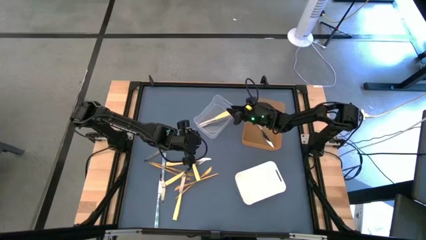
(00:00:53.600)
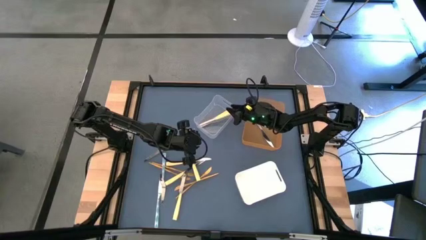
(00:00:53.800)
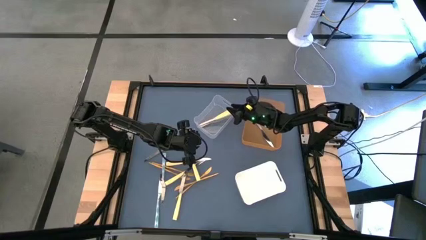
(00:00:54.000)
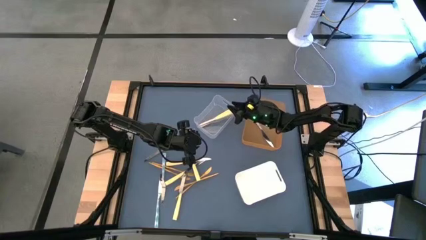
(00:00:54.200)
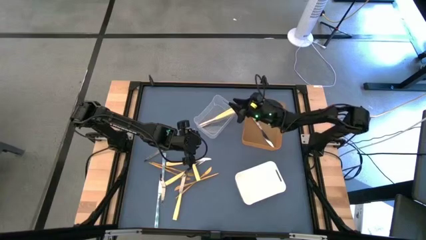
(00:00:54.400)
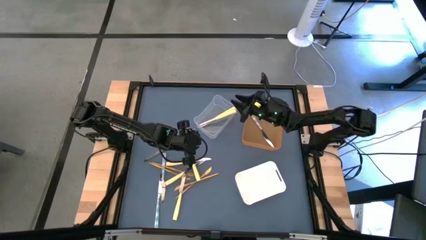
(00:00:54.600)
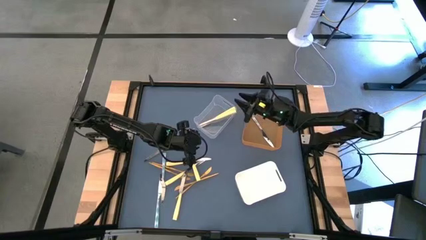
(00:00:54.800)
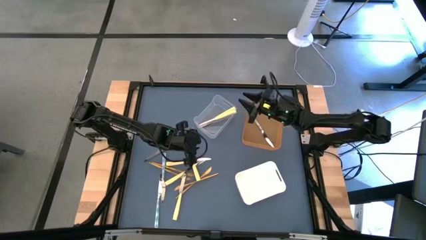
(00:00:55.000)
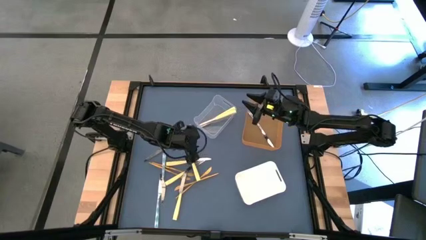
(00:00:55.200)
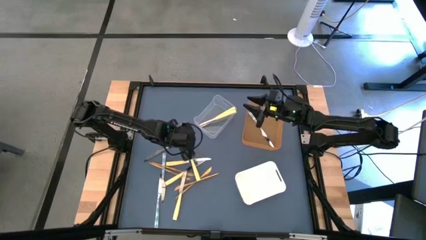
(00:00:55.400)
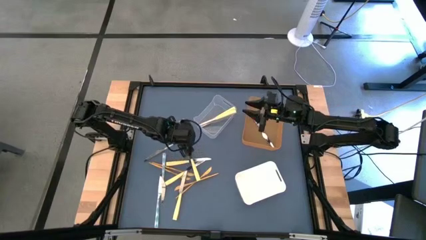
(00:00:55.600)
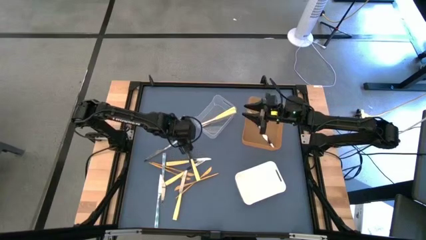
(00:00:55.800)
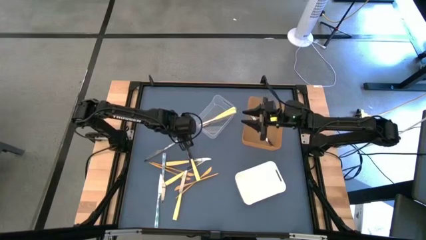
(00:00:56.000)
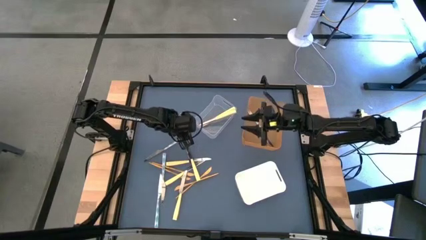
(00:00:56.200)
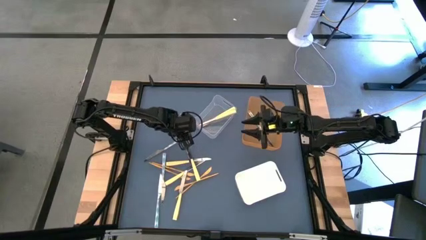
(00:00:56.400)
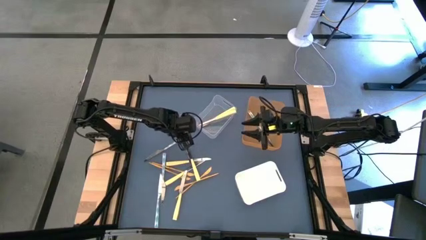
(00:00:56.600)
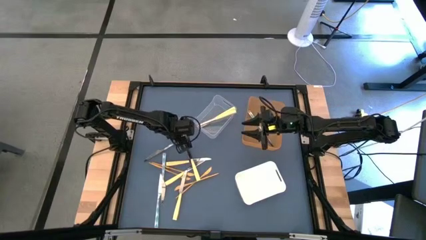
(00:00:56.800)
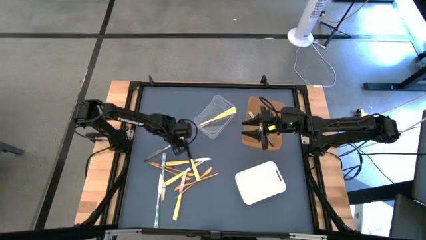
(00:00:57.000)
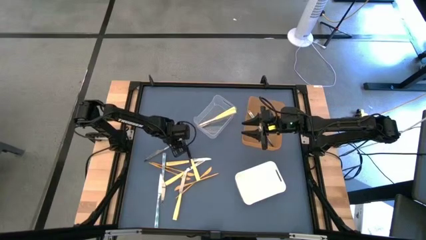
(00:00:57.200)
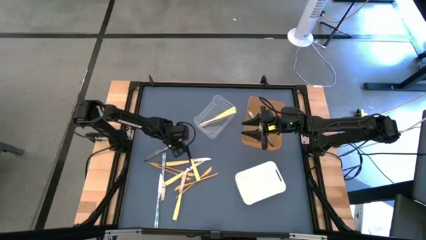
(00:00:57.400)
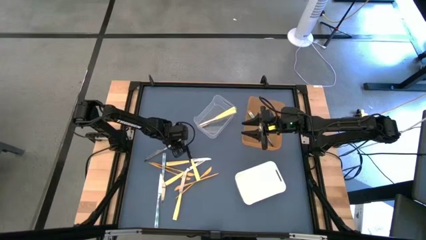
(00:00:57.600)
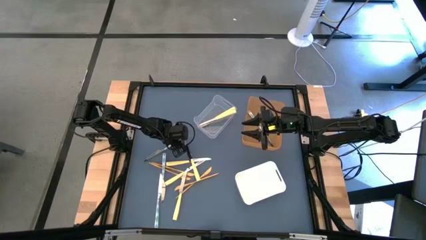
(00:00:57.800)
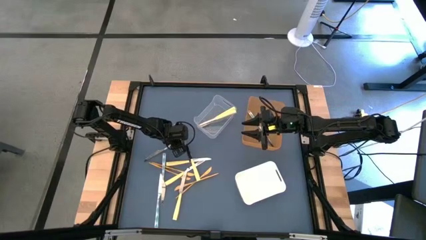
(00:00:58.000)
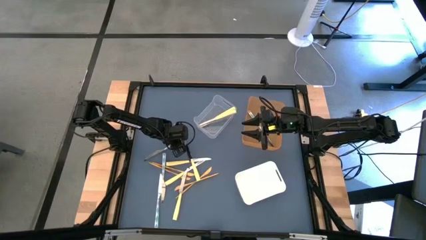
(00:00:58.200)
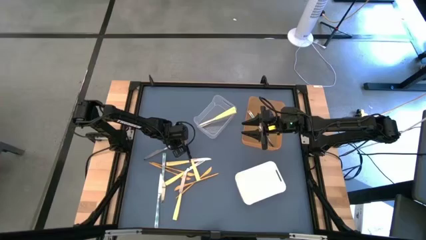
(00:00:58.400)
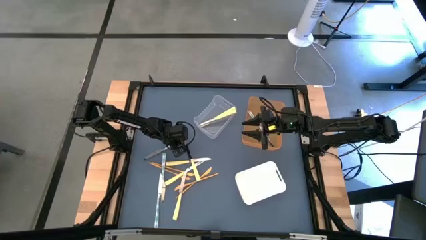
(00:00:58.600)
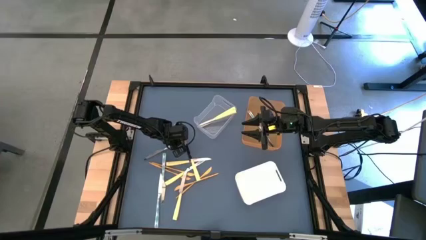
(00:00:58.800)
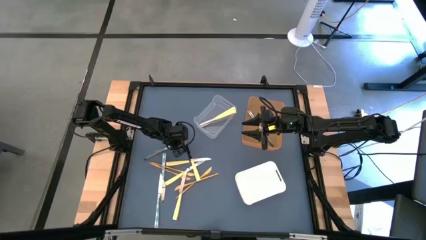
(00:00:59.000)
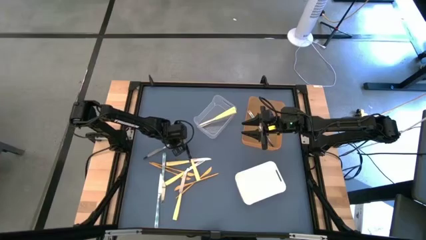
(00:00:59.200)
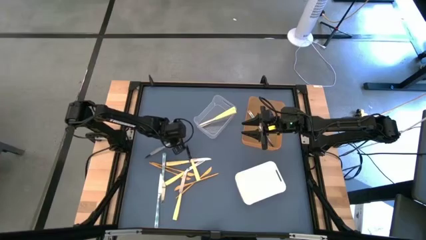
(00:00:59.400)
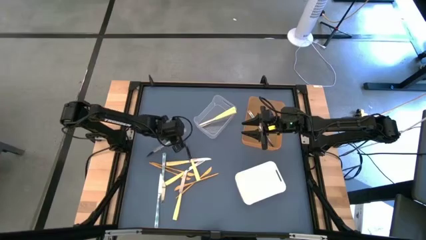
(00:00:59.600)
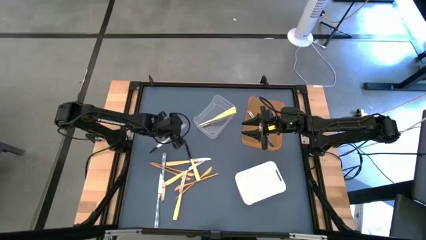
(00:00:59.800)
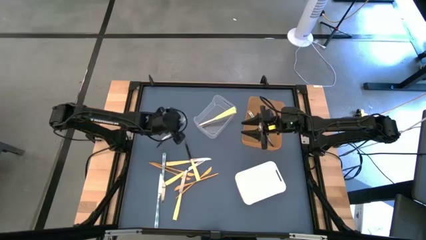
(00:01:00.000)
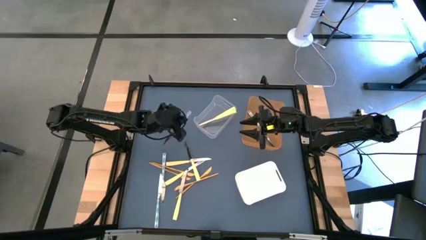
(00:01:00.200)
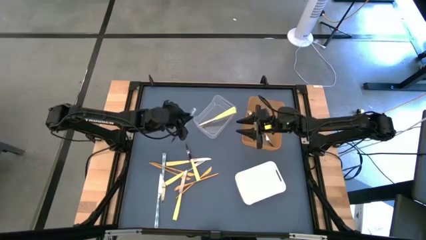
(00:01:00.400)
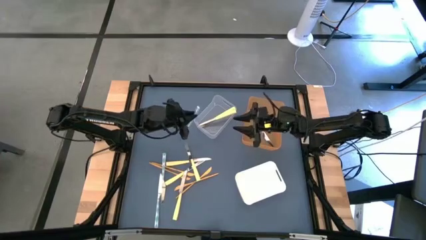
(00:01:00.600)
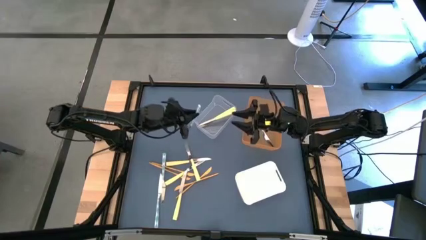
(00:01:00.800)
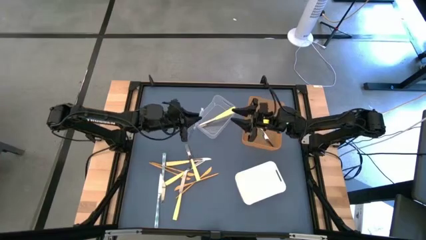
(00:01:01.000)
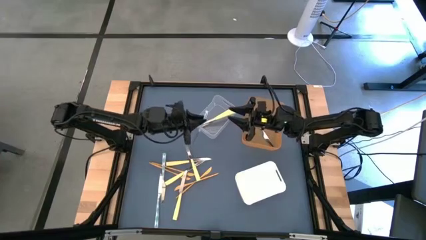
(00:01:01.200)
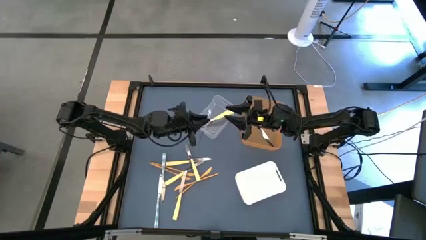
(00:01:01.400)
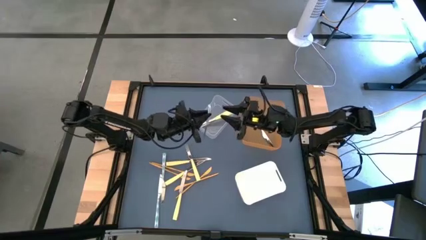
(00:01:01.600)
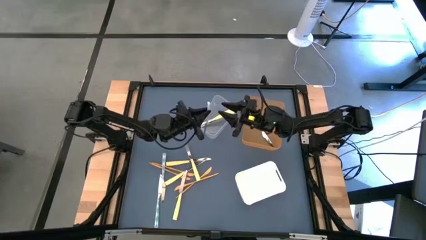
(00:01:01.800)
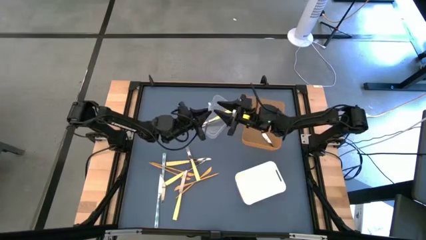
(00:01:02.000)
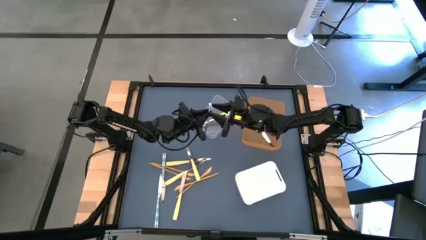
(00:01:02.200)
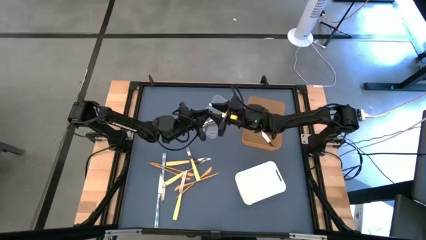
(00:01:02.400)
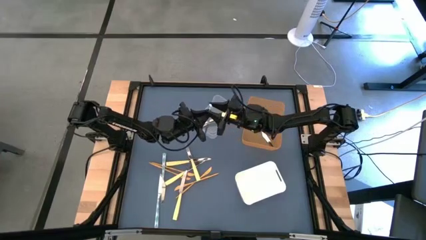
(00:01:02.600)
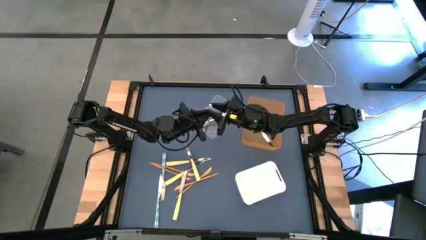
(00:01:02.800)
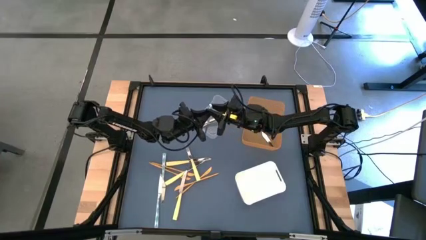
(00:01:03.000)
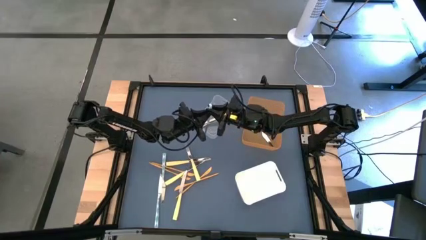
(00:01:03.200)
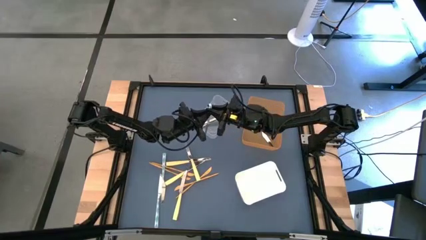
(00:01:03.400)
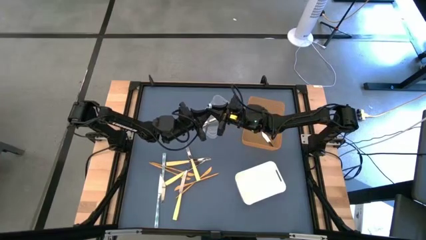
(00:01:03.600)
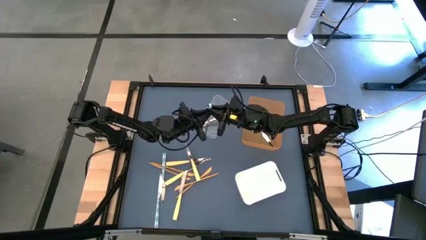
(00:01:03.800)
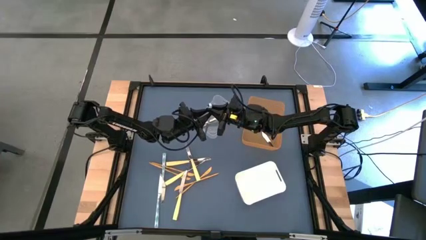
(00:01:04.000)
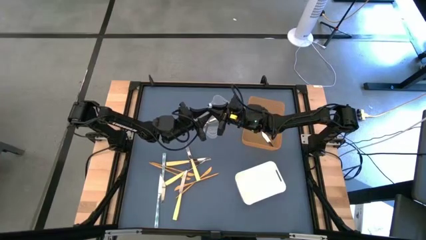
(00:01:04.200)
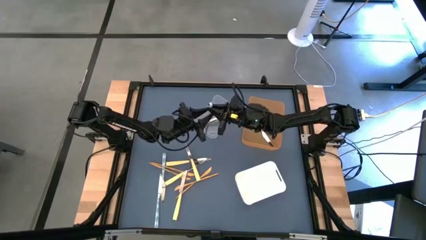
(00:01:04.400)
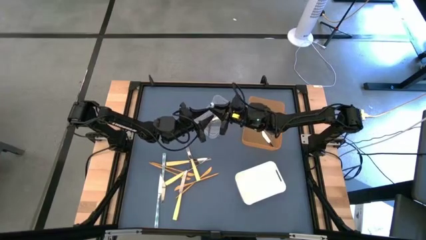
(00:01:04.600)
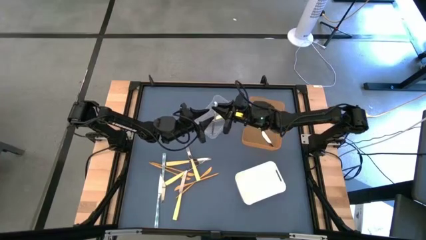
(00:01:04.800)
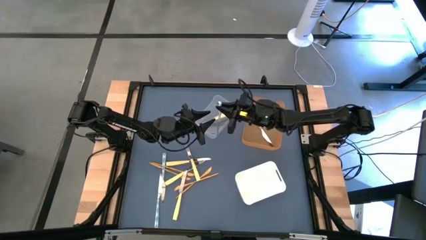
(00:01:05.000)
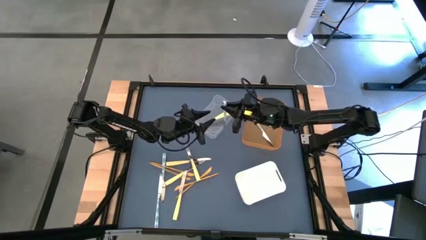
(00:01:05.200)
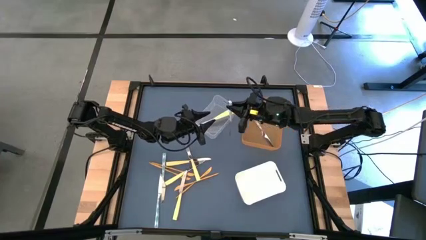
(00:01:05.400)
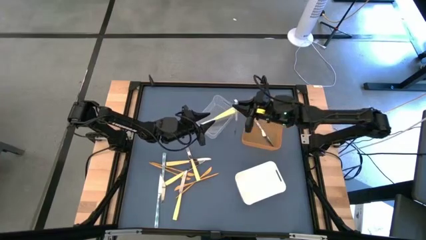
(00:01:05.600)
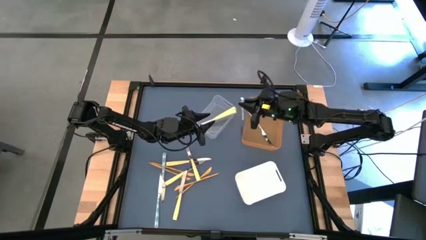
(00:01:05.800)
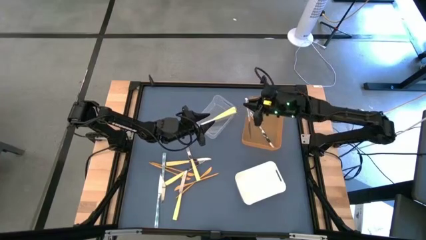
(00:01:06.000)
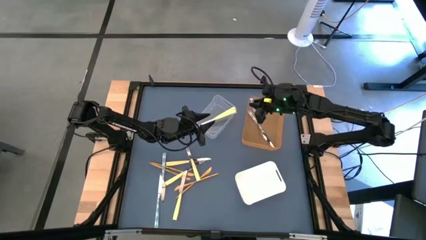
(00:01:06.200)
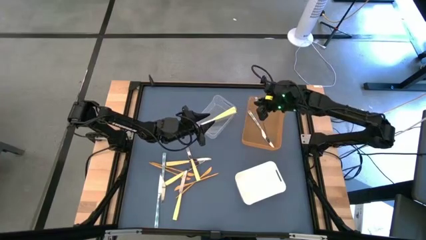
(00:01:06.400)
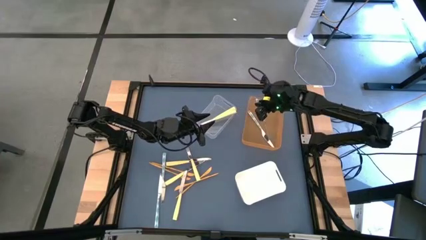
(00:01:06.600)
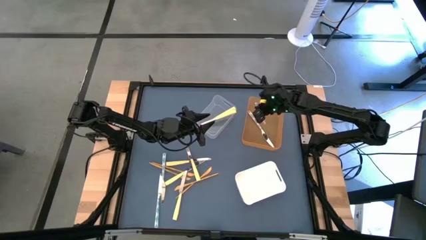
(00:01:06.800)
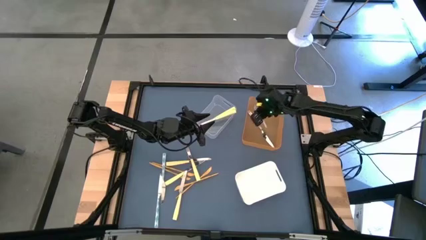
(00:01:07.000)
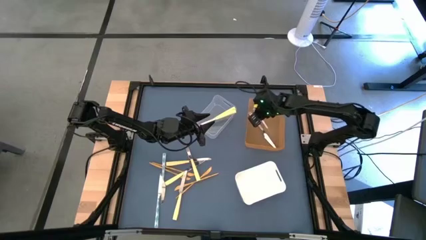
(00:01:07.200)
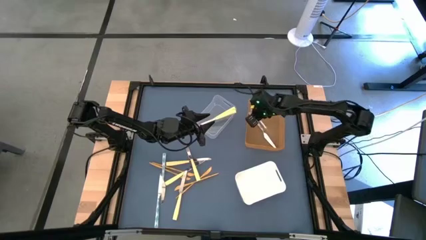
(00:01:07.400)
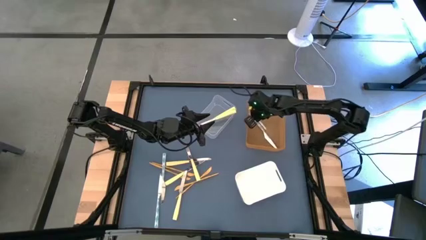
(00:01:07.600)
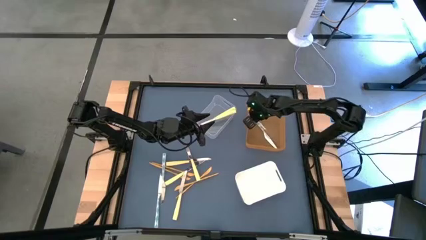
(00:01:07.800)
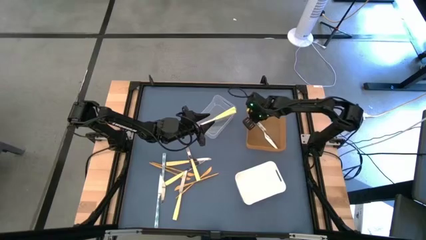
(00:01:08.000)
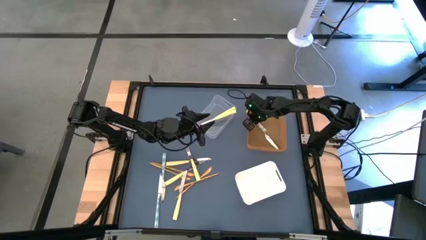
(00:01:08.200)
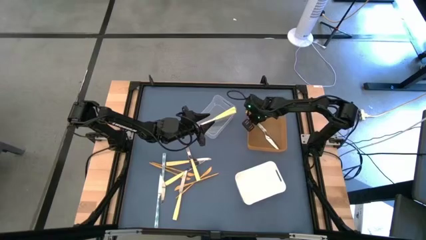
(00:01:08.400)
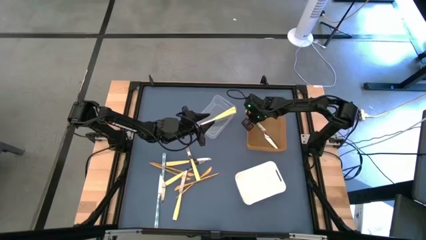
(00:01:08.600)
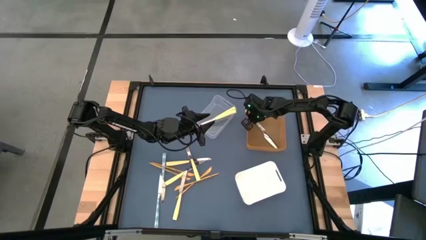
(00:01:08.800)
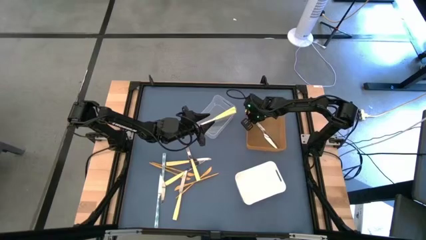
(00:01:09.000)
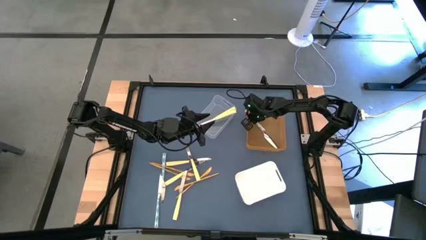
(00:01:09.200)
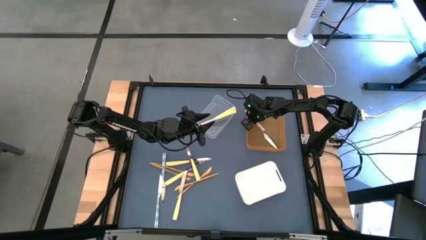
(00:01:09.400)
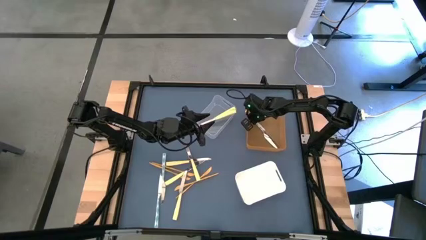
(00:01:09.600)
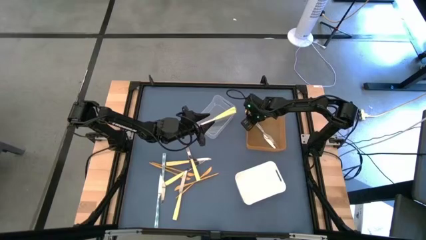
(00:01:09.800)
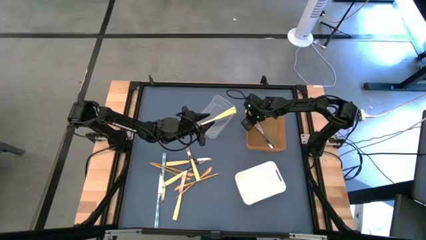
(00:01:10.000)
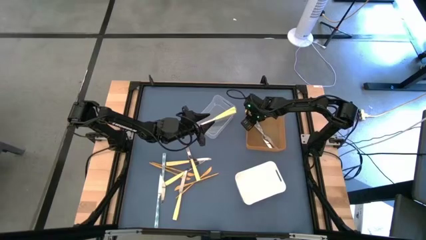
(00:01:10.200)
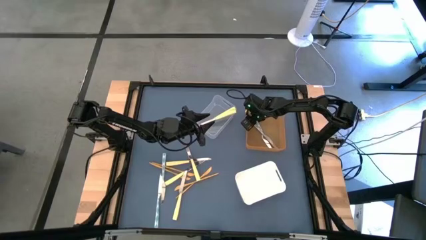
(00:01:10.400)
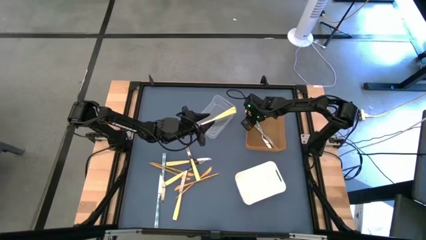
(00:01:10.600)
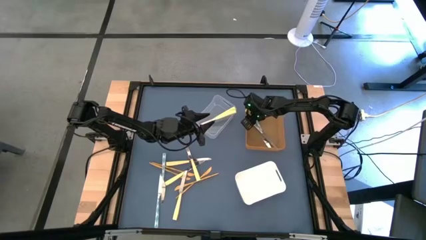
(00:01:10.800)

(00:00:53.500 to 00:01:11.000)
Task: Sort silverware by color (type)
Put the white knife into the orange bin
